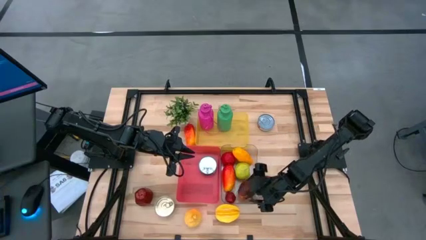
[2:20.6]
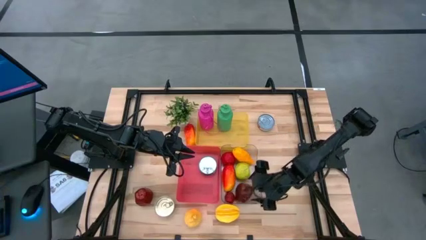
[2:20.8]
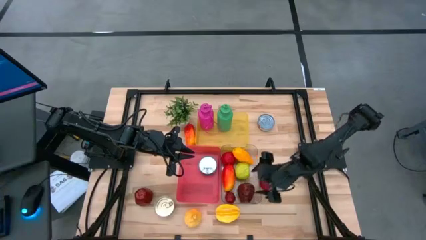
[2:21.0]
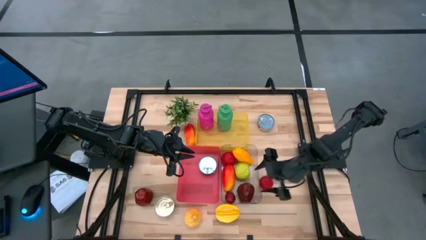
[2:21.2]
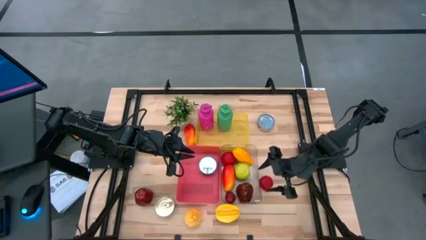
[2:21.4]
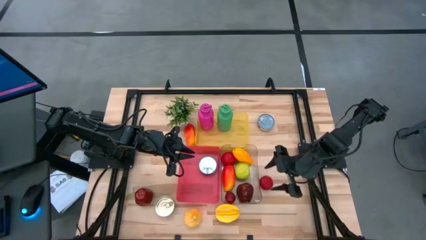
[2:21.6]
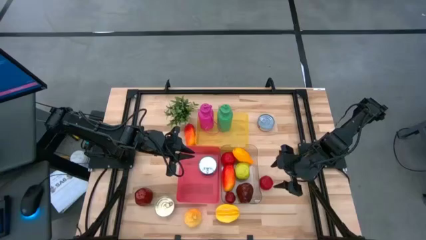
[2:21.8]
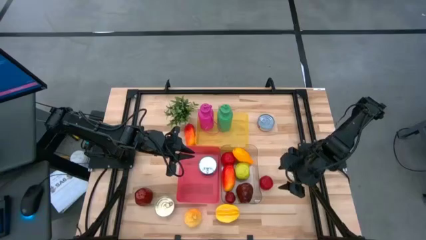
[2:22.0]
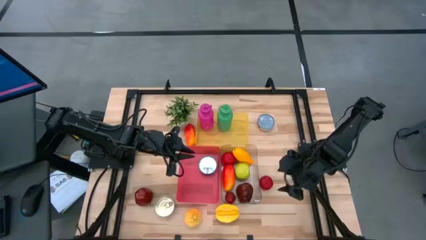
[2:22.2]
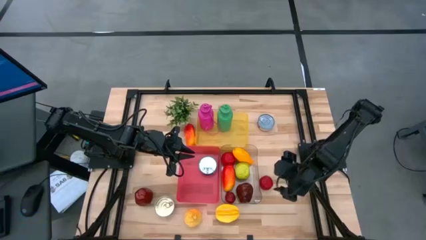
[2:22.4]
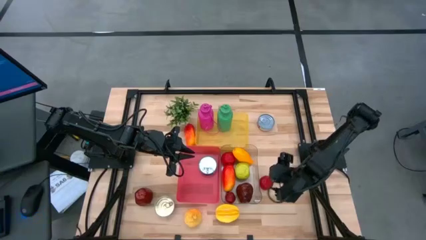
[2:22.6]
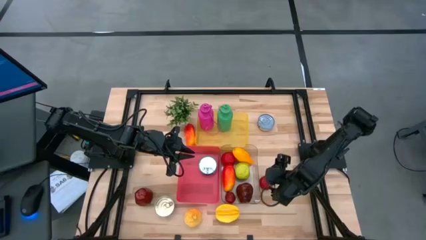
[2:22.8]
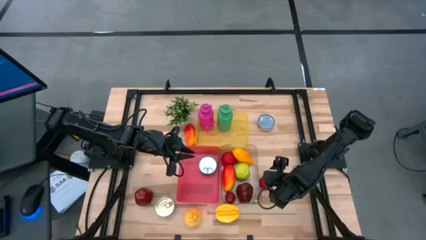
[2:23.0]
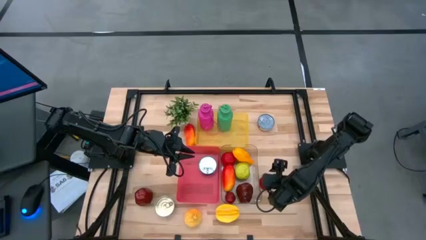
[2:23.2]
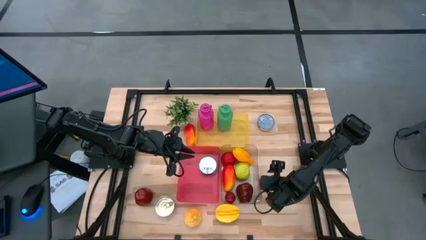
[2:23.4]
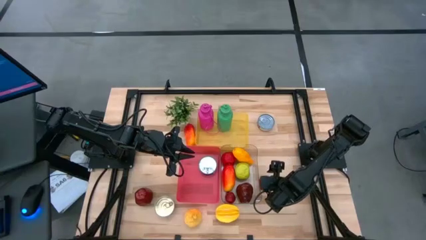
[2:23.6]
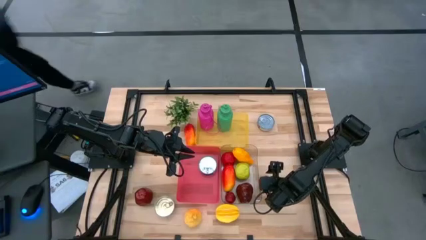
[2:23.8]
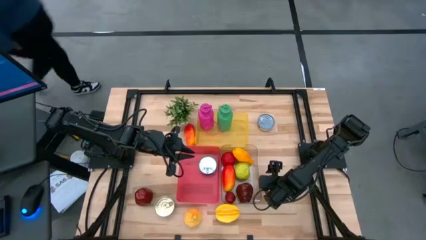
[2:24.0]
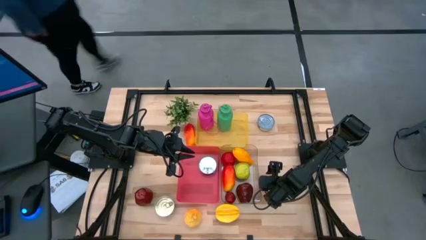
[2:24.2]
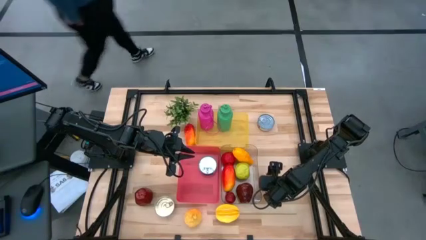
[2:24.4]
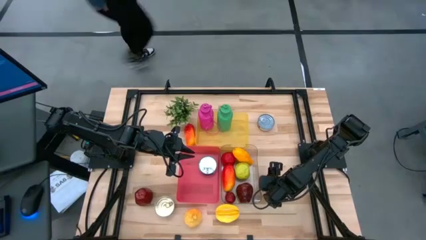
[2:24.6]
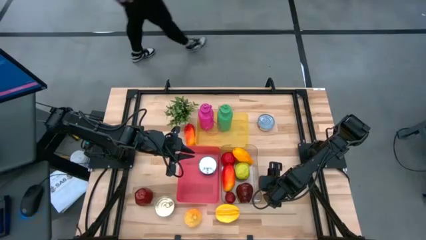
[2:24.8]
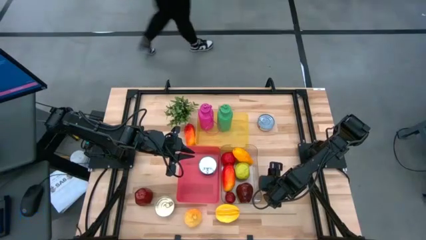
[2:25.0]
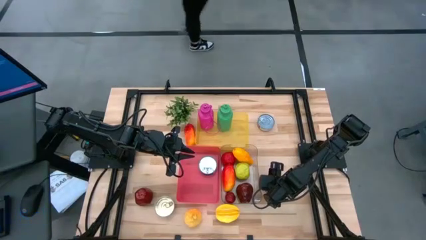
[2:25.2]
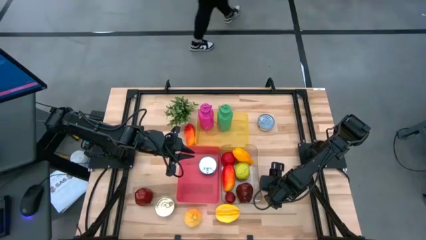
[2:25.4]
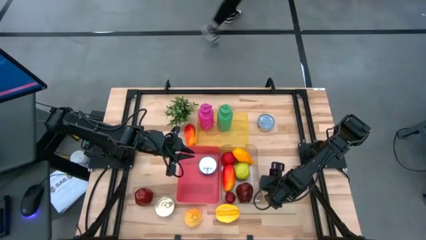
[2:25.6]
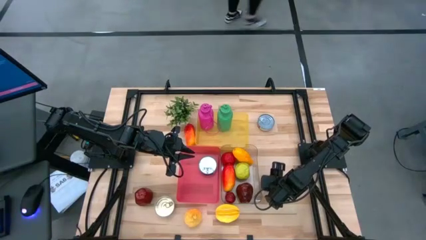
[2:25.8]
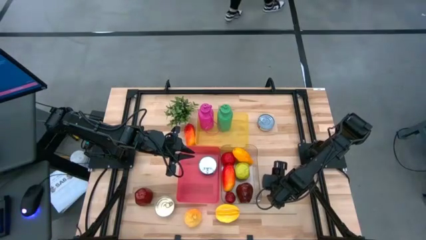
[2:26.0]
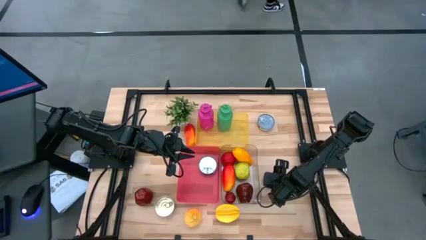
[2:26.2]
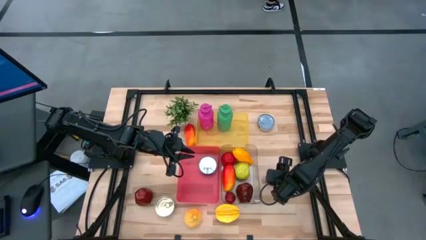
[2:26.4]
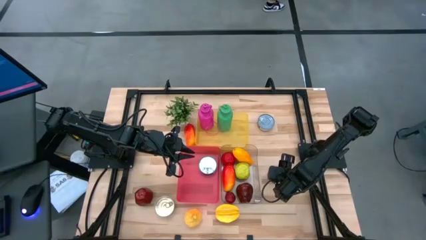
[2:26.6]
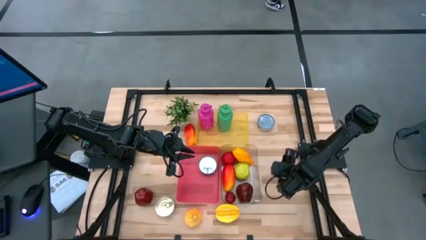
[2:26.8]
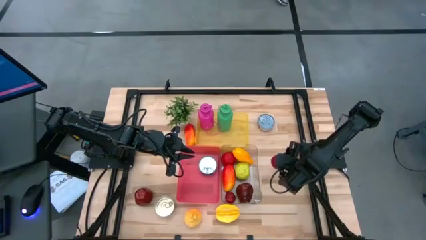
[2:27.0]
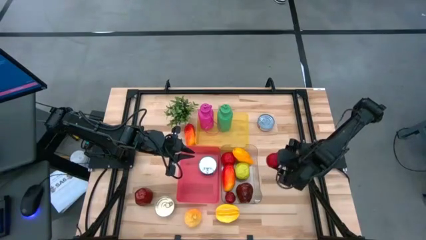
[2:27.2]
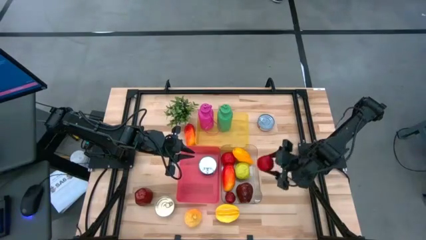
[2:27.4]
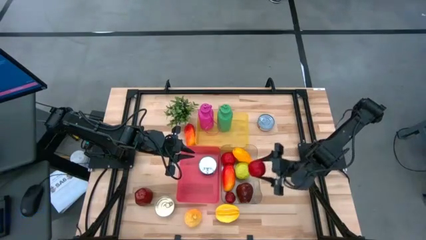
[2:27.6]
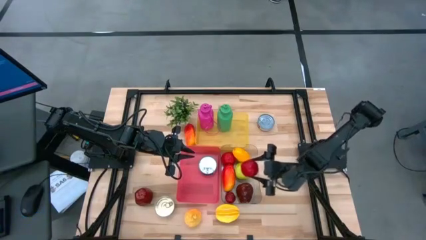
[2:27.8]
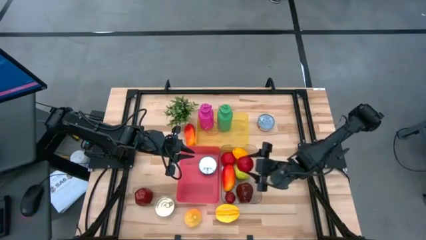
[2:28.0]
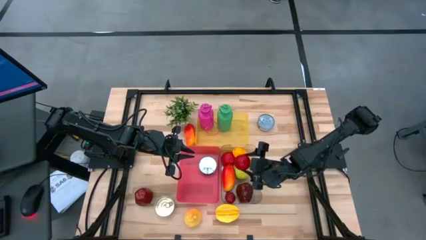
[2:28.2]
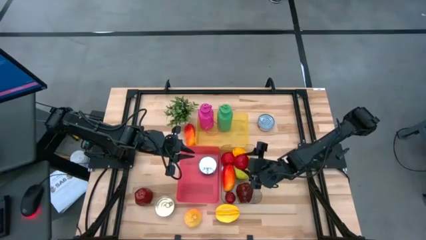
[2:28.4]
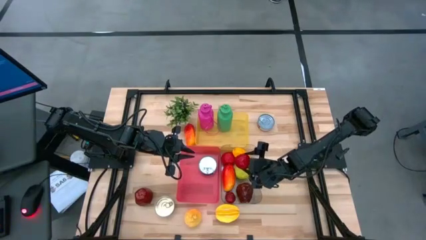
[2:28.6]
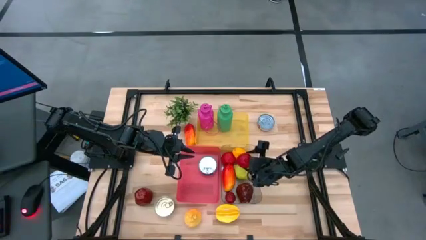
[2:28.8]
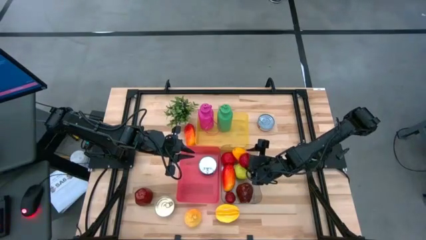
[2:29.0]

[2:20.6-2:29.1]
Task: Pick & Place Food Item
Put the pomegranate on the left into the transparent bin

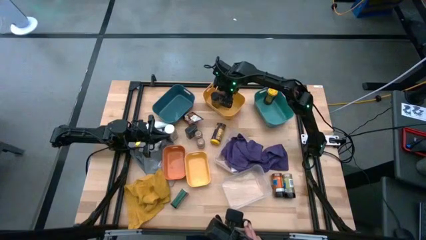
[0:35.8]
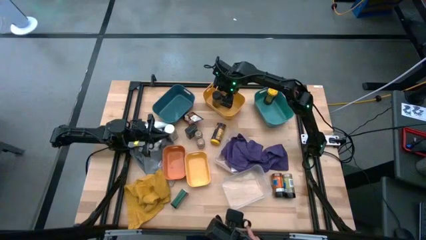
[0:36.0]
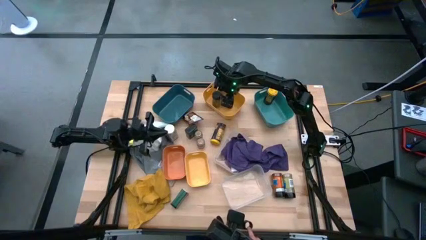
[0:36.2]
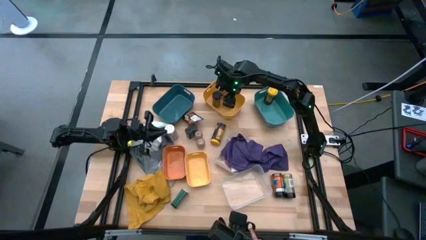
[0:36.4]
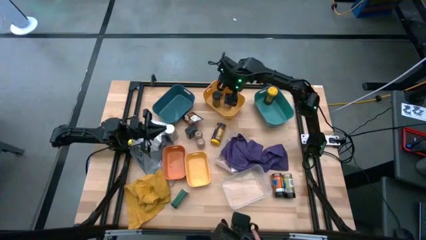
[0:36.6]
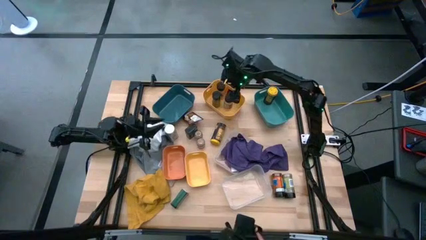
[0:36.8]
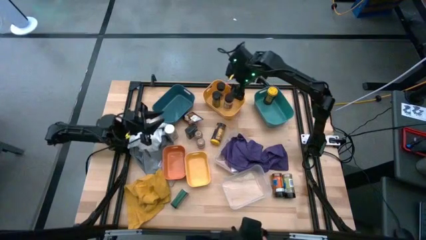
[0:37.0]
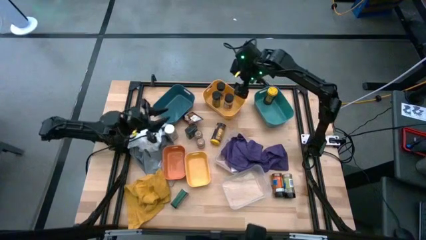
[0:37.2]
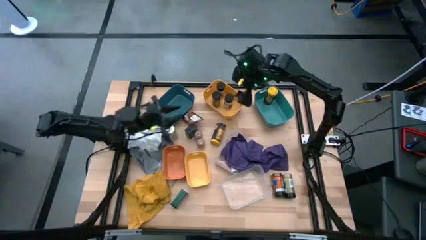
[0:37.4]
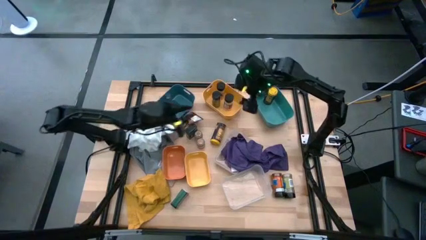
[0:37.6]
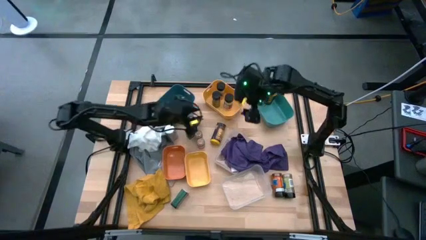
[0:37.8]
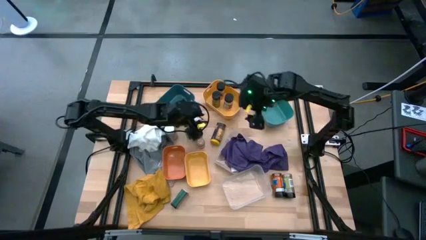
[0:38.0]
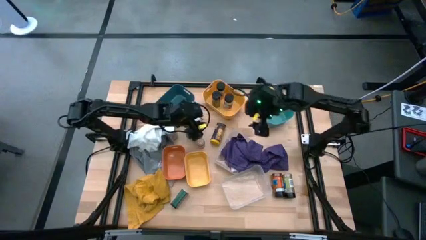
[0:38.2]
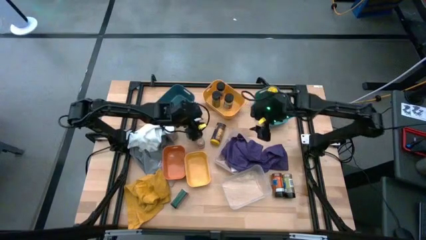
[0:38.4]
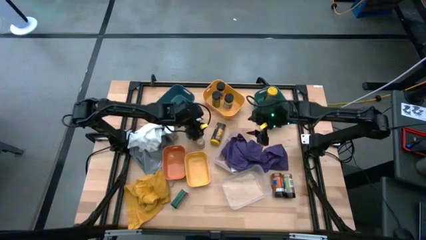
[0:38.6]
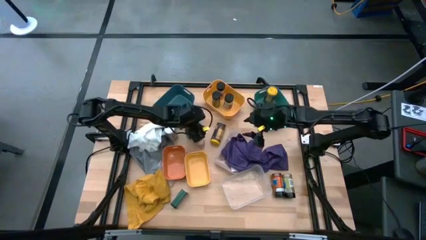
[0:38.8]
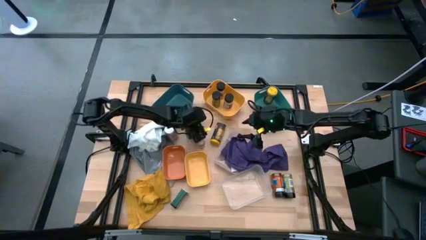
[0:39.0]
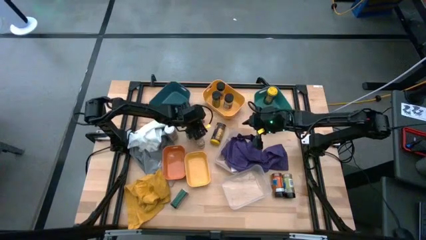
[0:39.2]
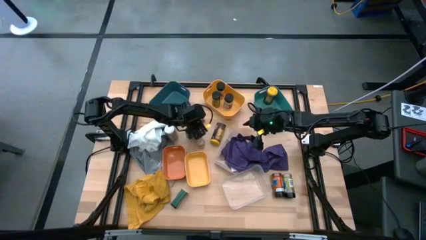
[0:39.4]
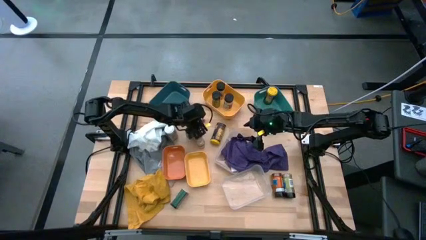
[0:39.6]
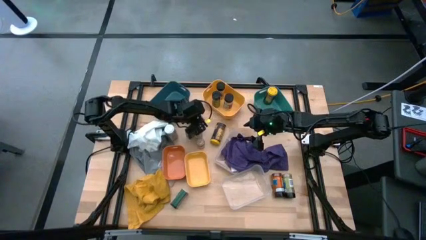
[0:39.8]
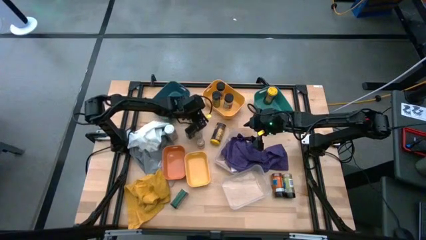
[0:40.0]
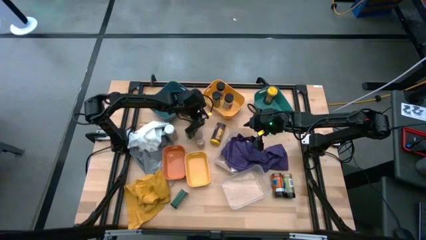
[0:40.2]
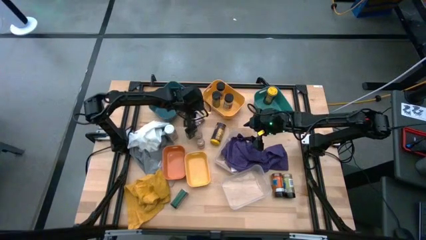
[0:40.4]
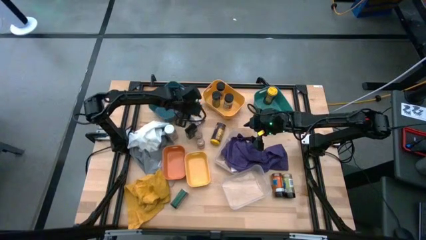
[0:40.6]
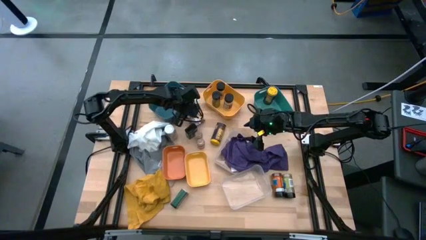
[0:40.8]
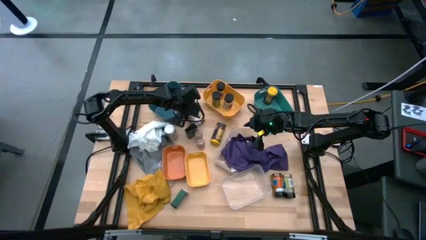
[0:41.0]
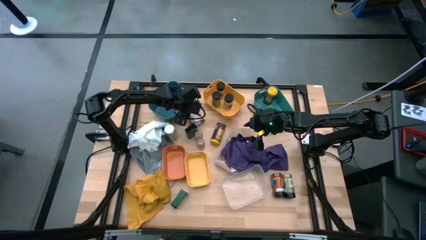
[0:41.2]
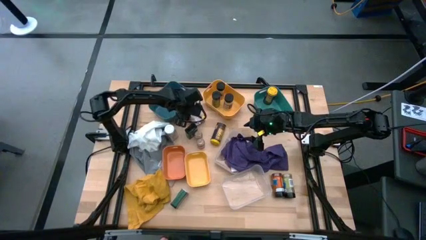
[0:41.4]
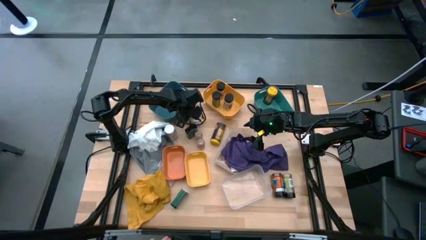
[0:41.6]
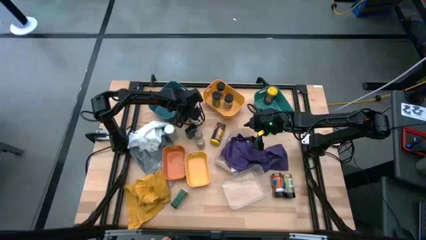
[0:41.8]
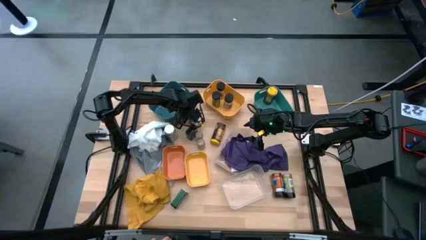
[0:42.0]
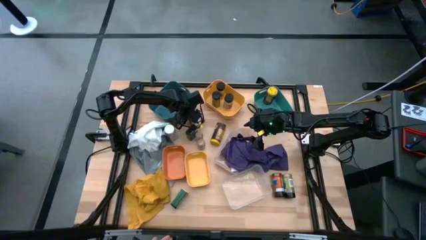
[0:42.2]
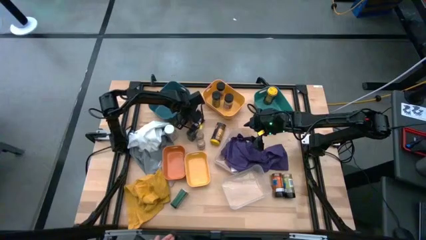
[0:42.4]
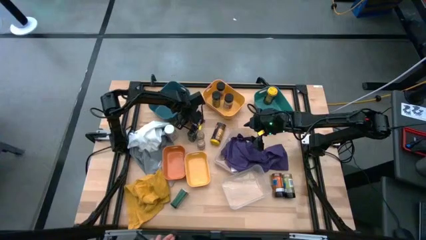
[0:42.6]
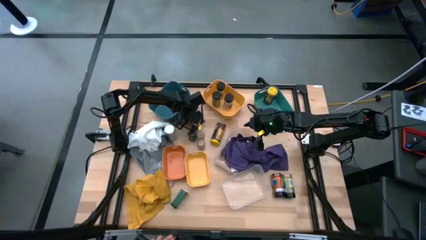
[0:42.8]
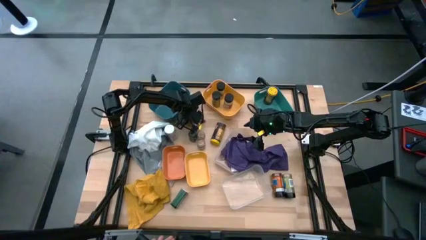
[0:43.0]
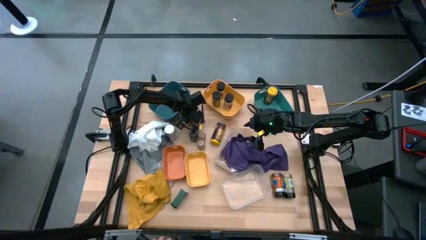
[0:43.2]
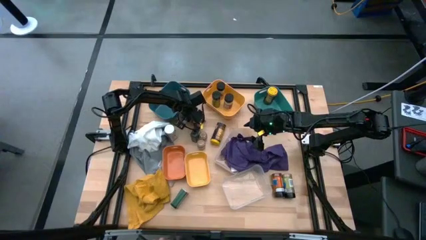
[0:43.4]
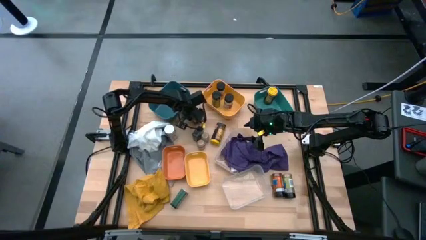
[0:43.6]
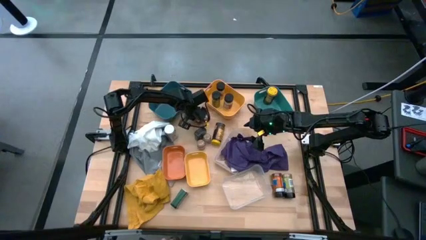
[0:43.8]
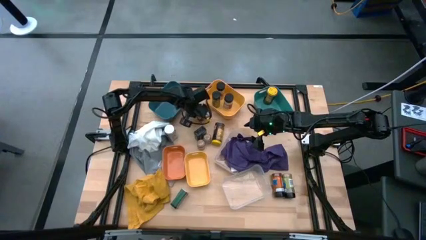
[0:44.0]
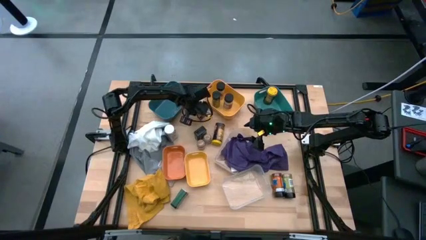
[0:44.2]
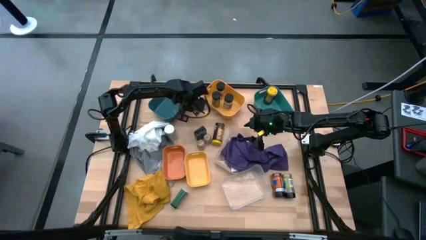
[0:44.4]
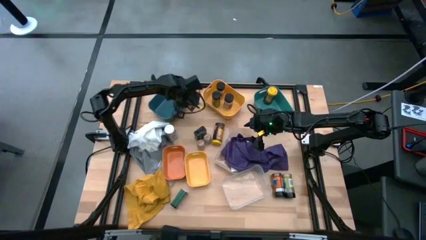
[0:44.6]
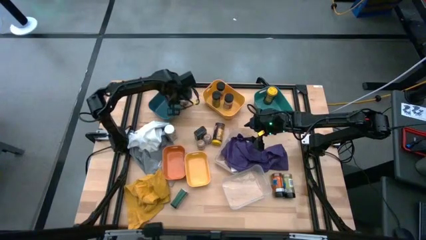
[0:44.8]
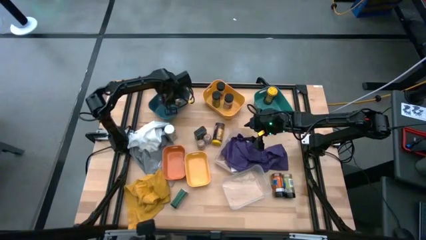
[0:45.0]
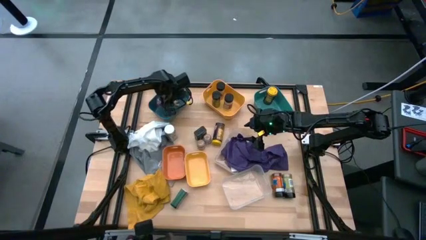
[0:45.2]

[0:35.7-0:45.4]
Task: Sort spices by type
Put the orange spice pack into the dark blue bin
